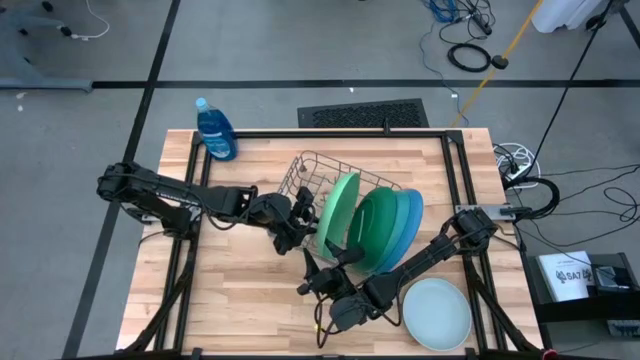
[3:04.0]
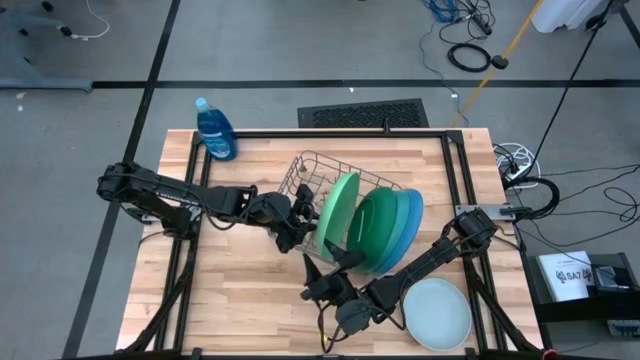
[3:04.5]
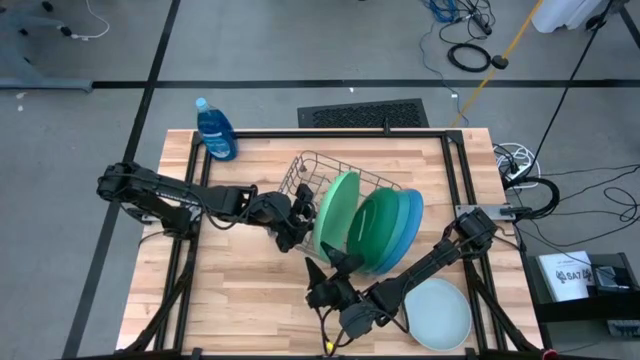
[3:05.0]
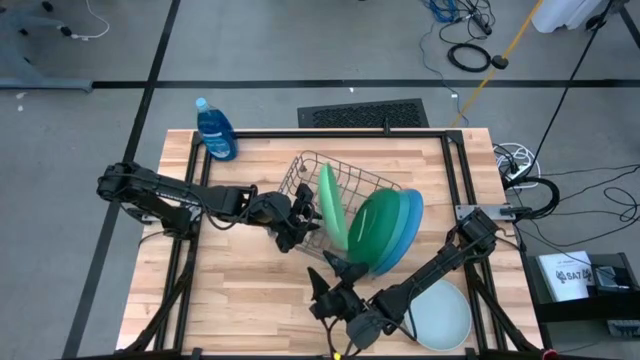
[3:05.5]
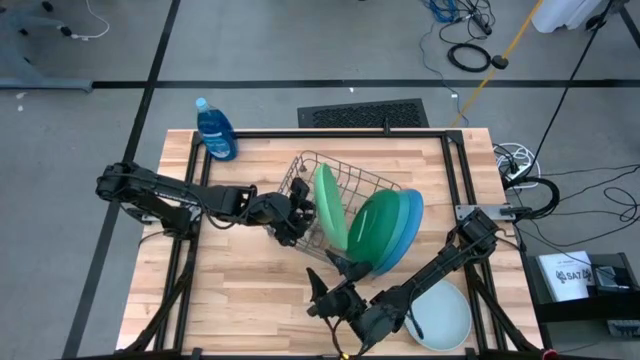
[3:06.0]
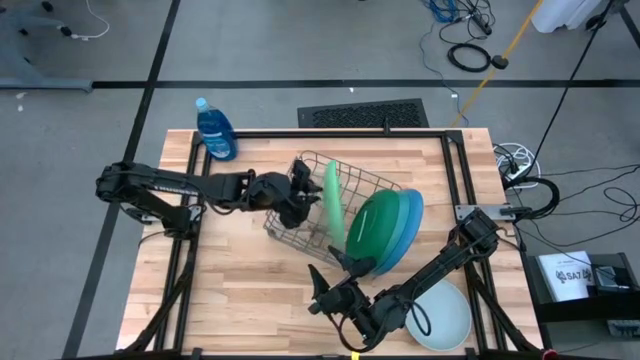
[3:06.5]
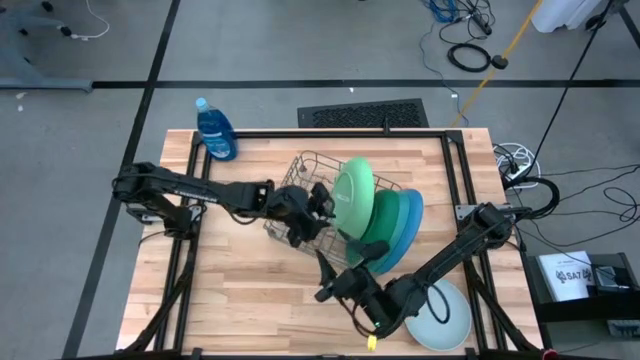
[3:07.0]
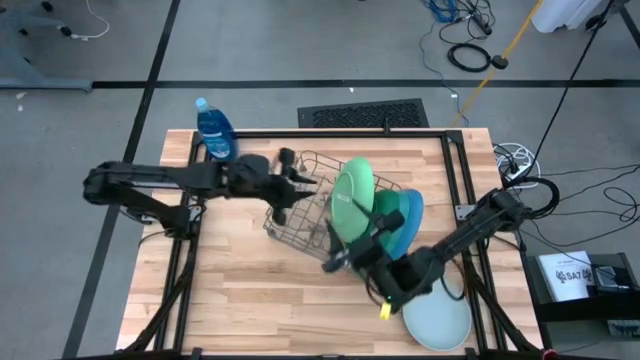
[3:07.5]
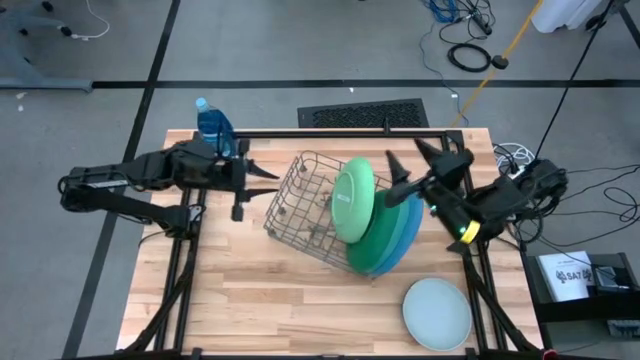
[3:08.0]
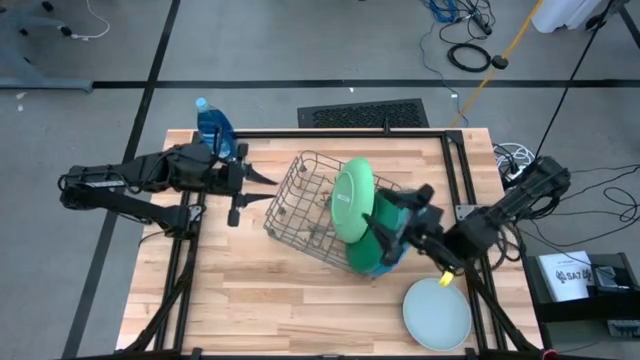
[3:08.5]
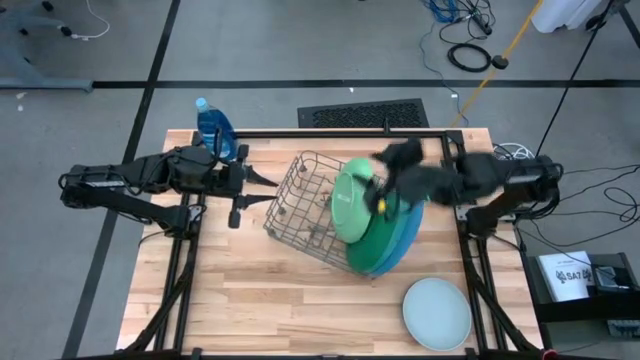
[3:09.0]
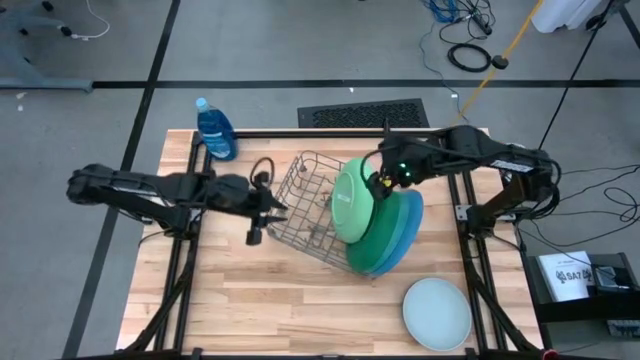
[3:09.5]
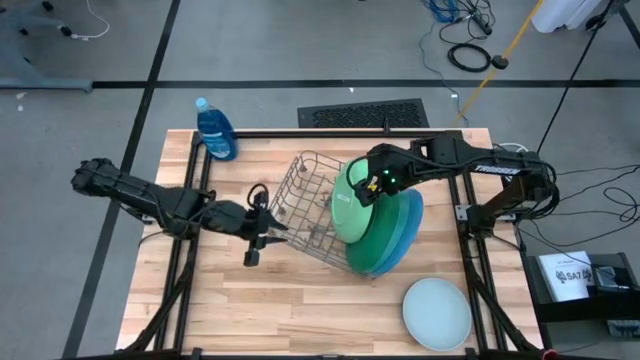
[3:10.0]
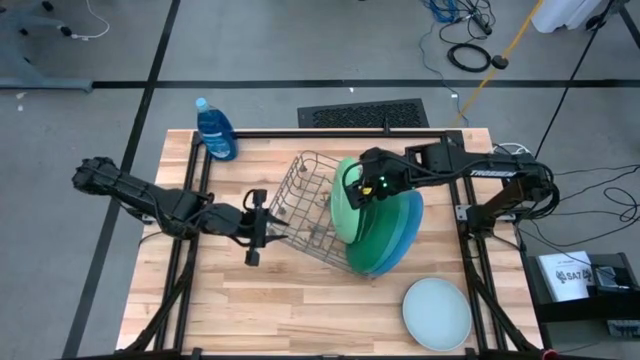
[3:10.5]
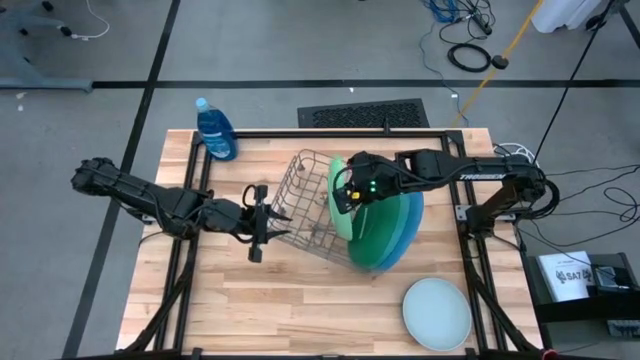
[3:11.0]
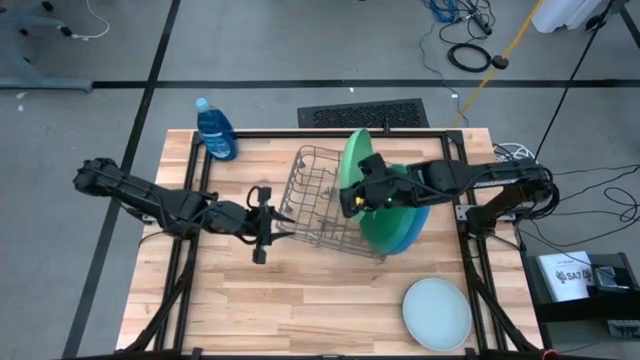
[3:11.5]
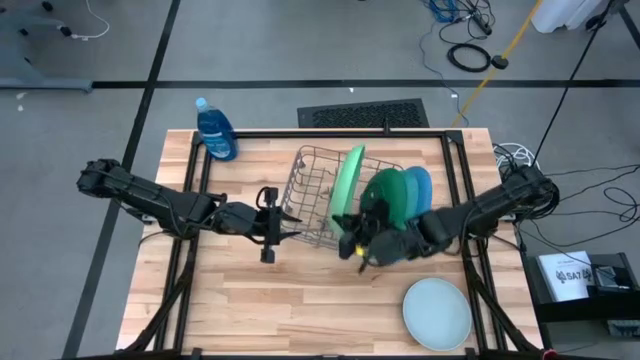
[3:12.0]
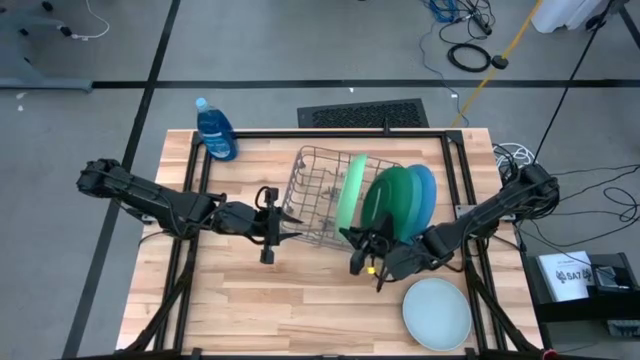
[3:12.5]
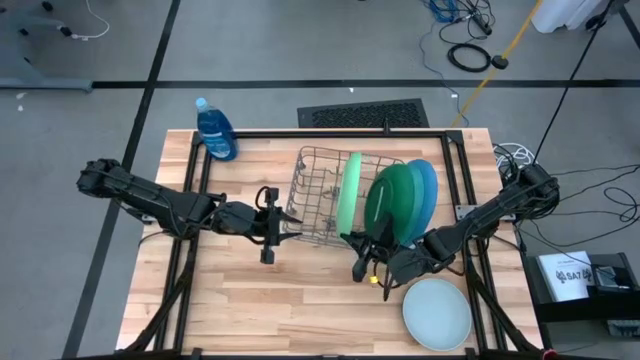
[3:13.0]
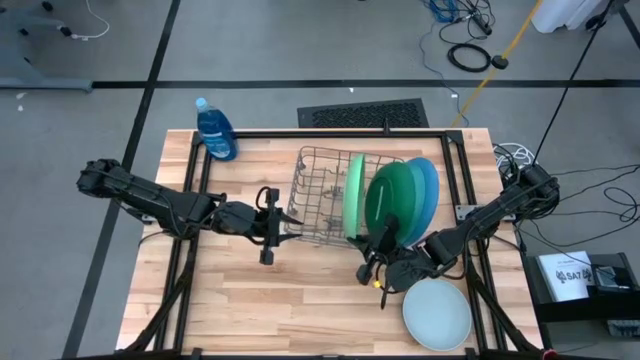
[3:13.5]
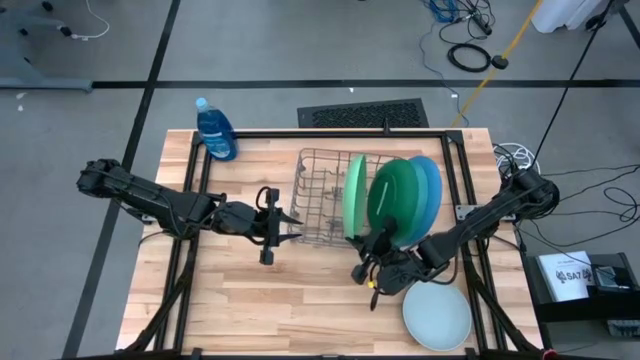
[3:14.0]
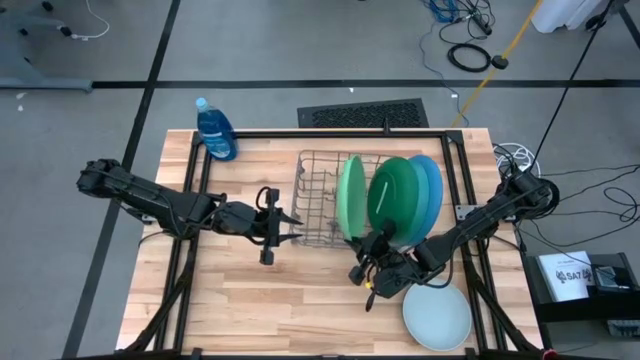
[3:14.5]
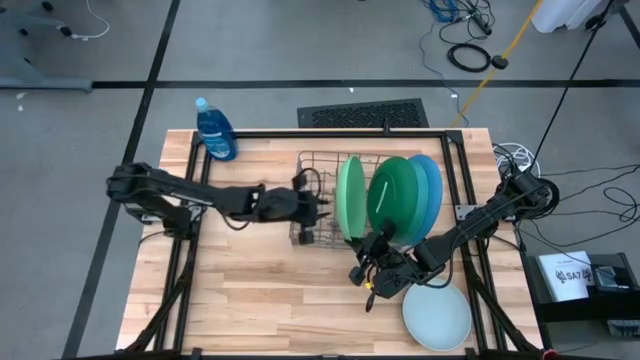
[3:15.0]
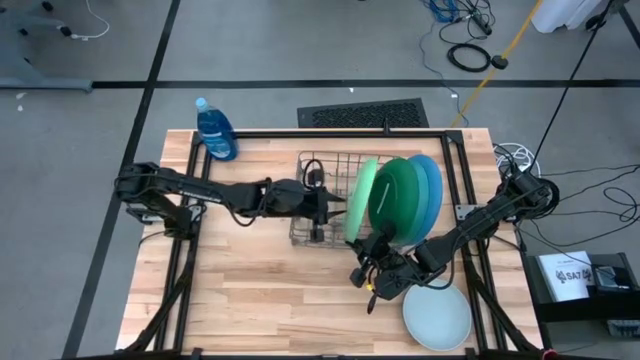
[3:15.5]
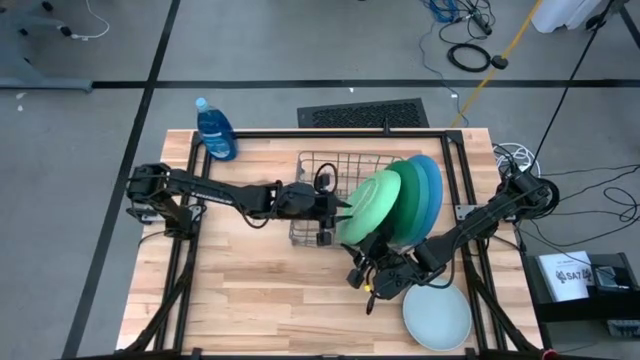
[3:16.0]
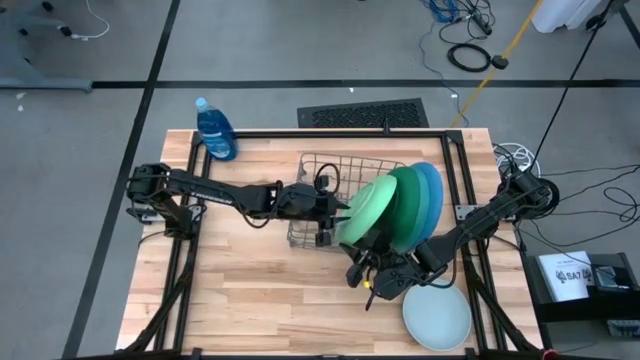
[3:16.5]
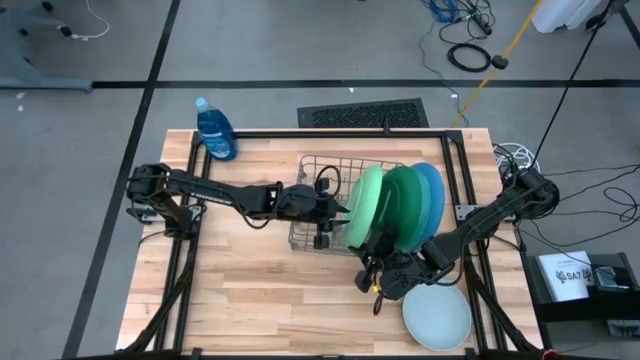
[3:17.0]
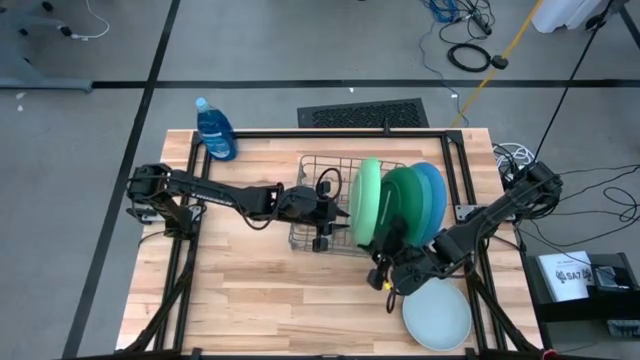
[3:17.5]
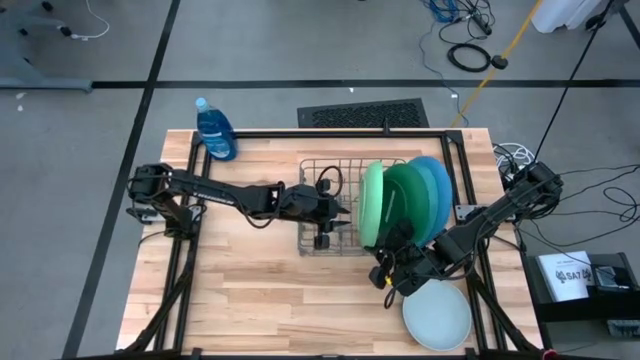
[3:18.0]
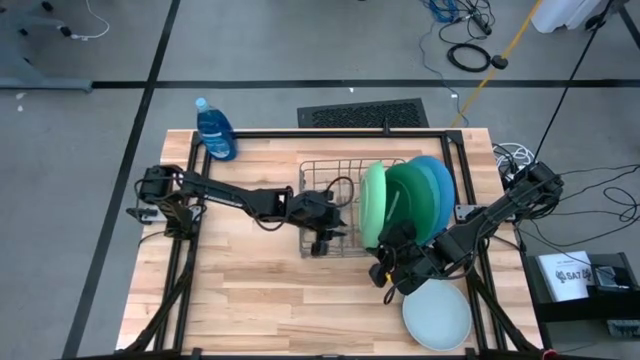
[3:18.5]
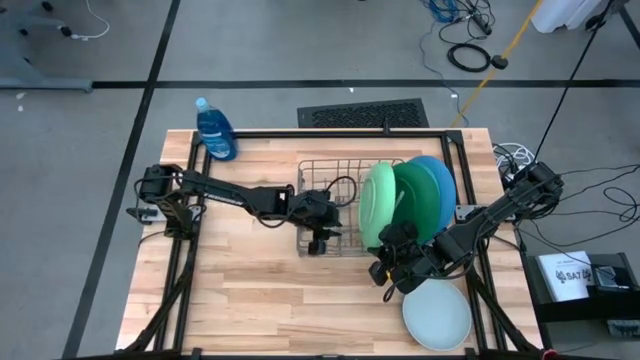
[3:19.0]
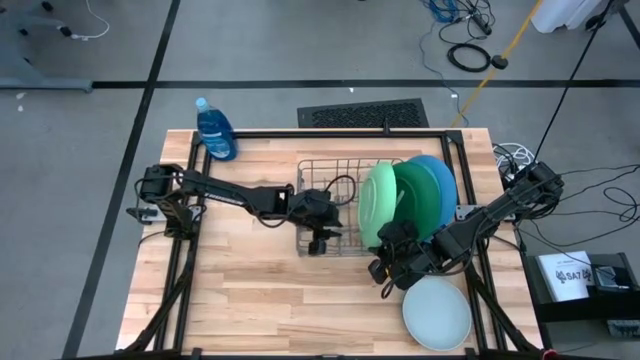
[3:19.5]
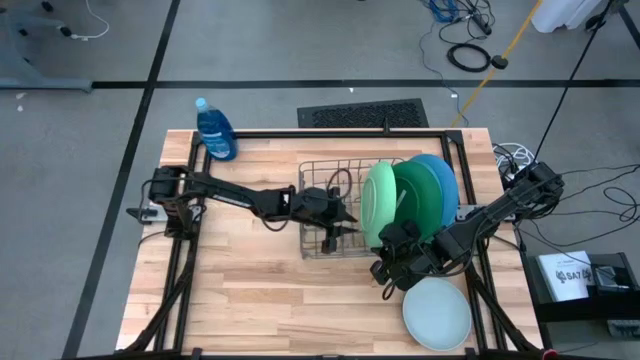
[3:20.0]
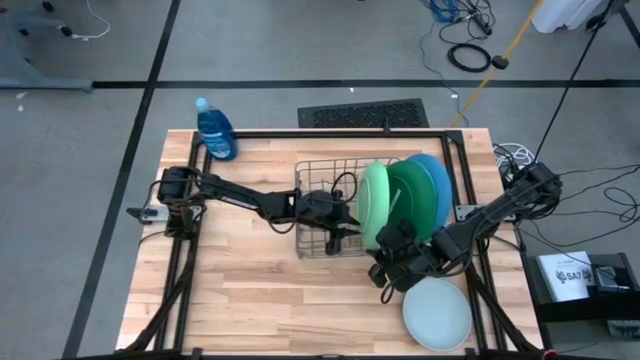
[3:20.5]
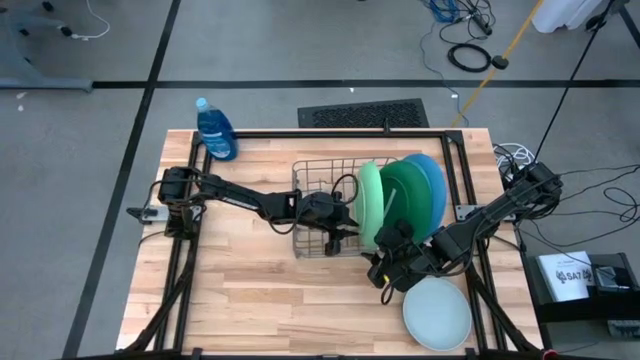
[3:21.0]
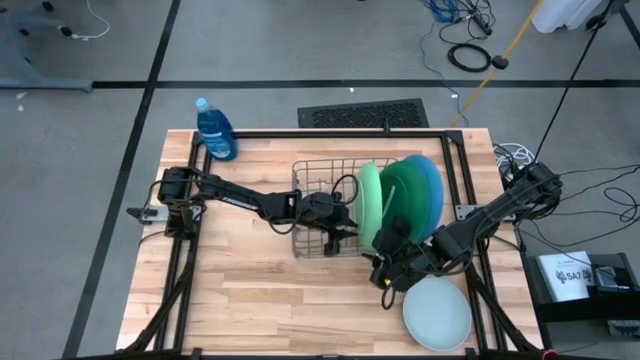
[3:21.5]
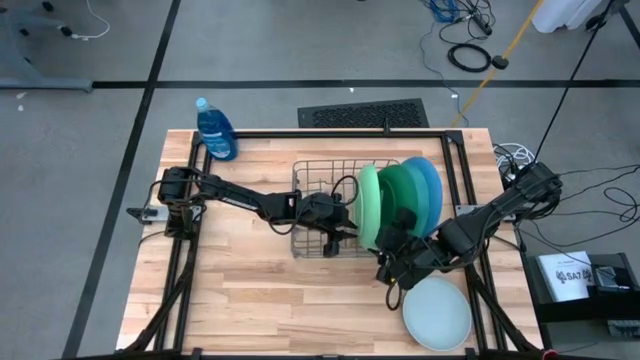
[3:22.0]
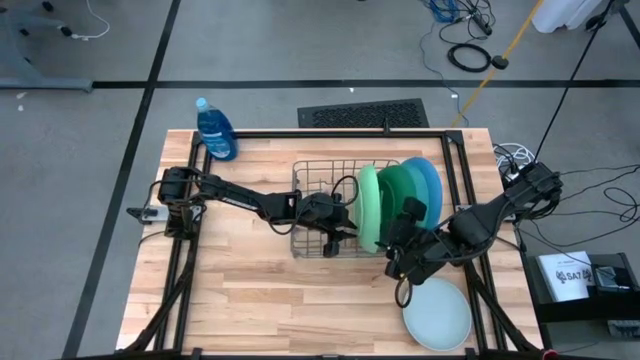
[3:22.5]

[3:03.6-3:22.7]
Task: Sort dishes
Put the light green plate into the dish rack
